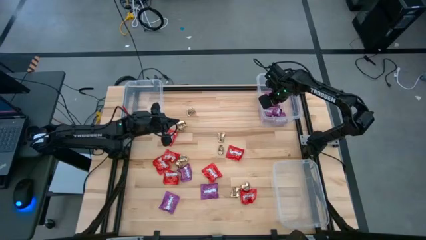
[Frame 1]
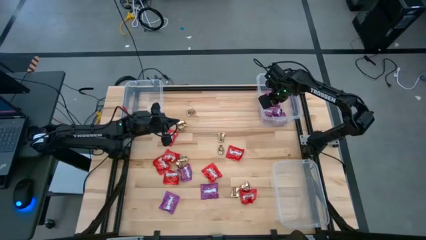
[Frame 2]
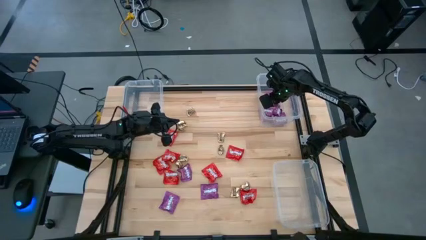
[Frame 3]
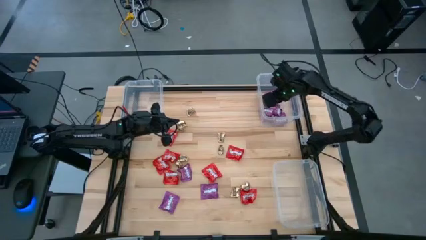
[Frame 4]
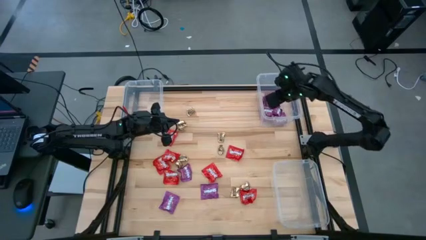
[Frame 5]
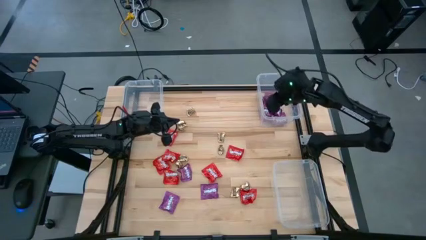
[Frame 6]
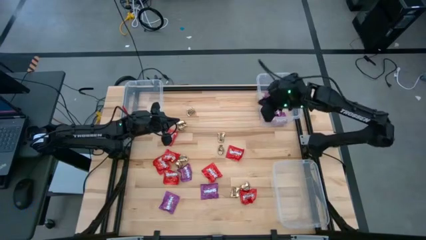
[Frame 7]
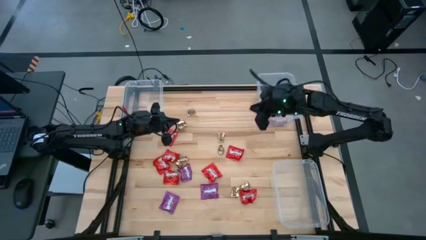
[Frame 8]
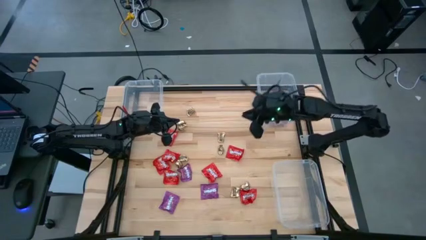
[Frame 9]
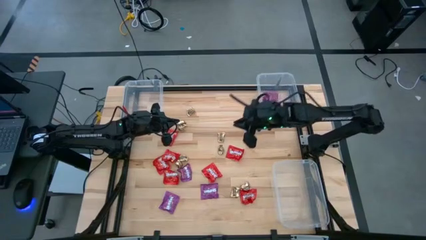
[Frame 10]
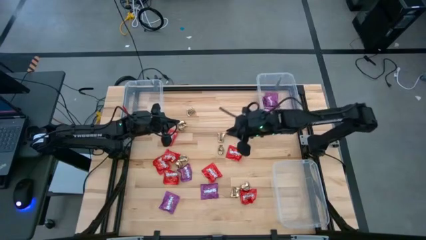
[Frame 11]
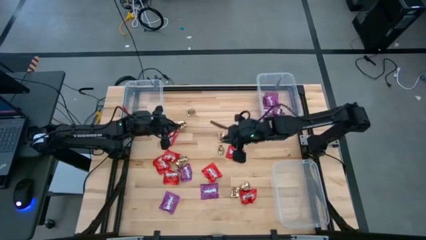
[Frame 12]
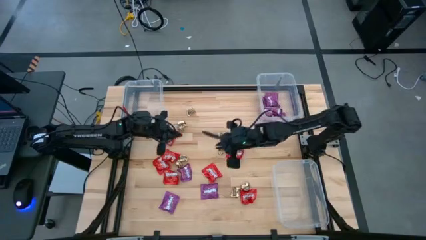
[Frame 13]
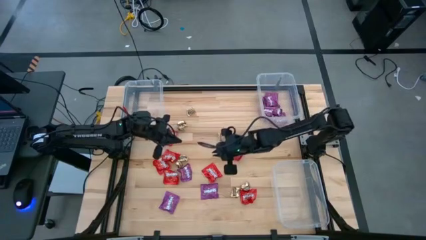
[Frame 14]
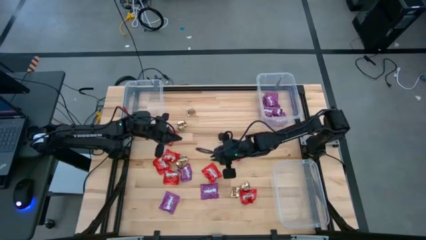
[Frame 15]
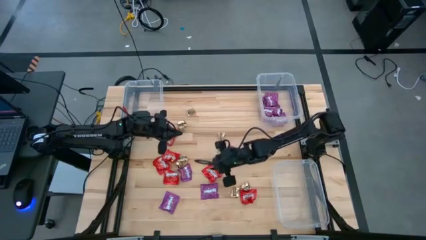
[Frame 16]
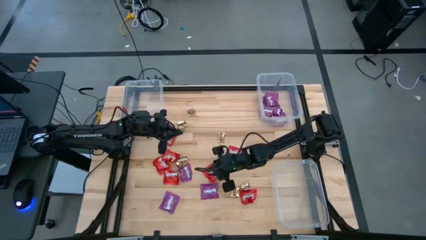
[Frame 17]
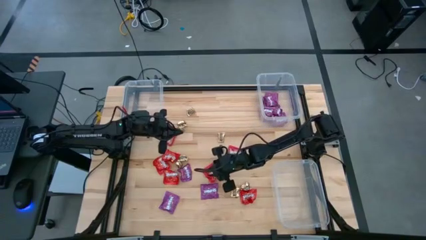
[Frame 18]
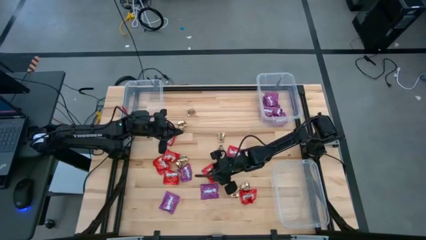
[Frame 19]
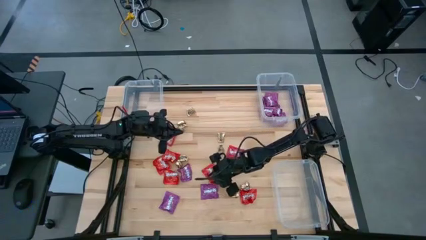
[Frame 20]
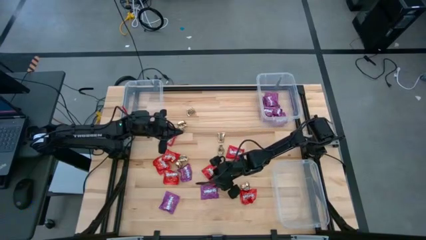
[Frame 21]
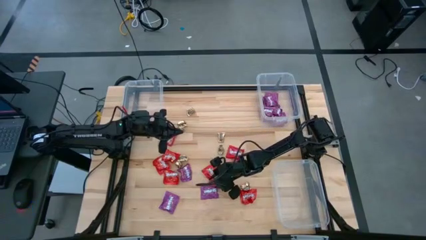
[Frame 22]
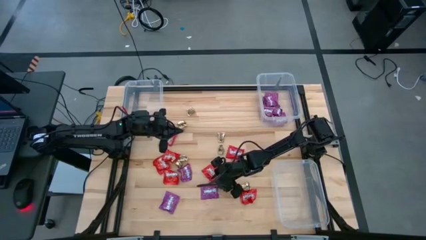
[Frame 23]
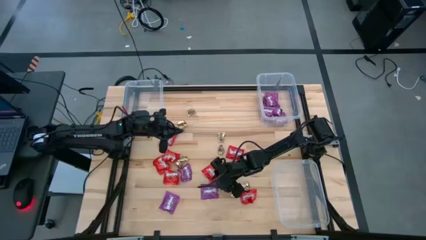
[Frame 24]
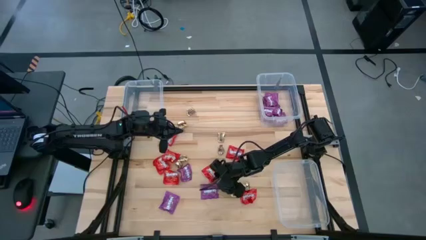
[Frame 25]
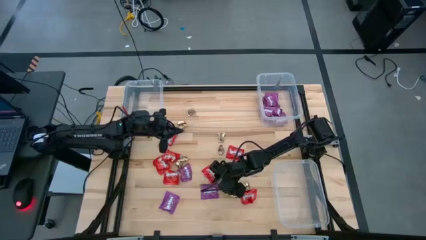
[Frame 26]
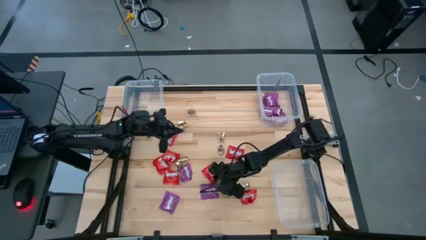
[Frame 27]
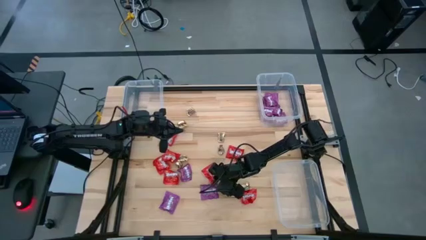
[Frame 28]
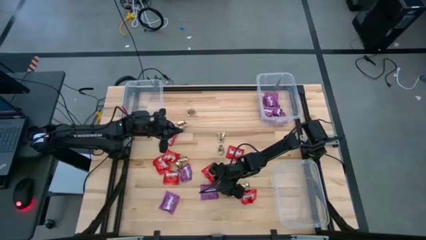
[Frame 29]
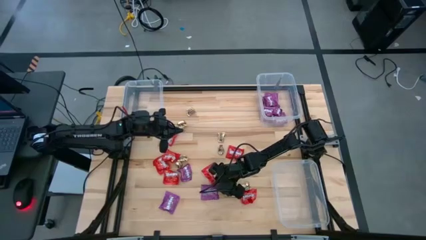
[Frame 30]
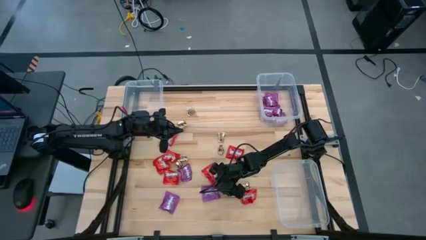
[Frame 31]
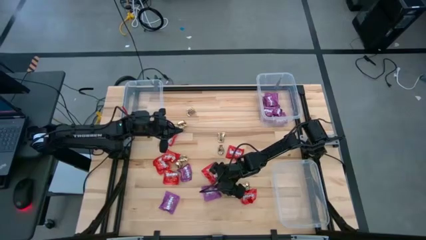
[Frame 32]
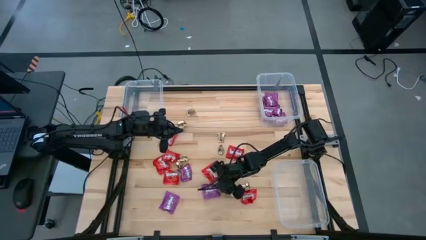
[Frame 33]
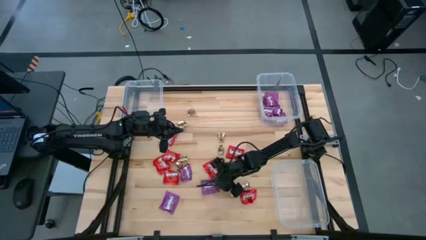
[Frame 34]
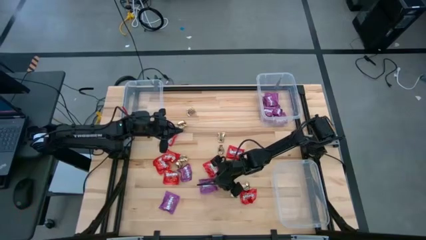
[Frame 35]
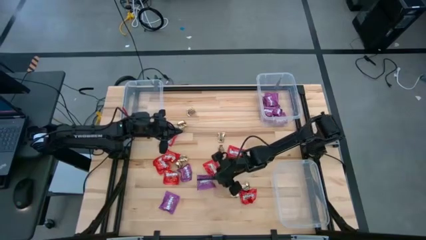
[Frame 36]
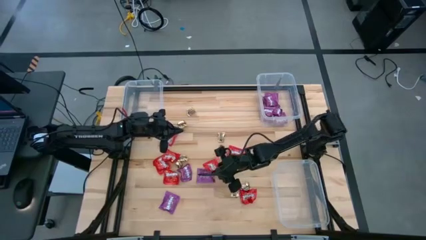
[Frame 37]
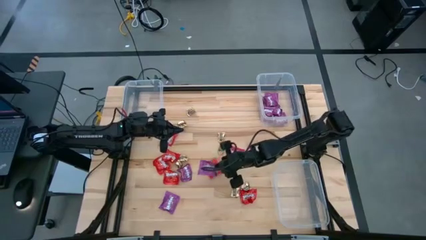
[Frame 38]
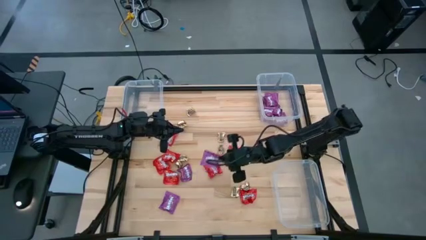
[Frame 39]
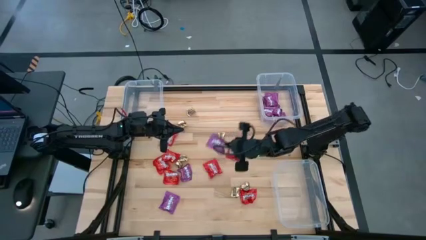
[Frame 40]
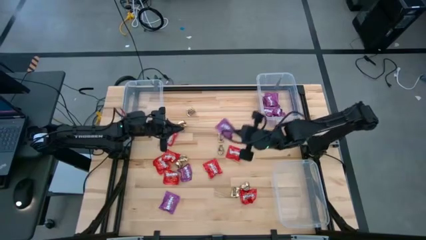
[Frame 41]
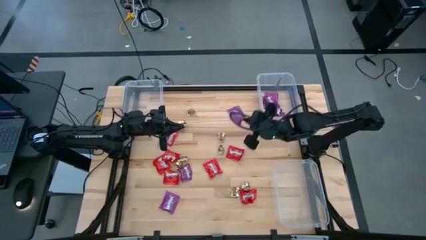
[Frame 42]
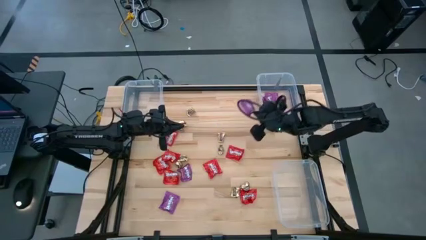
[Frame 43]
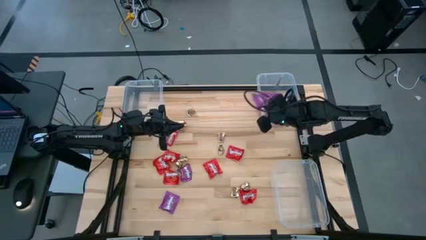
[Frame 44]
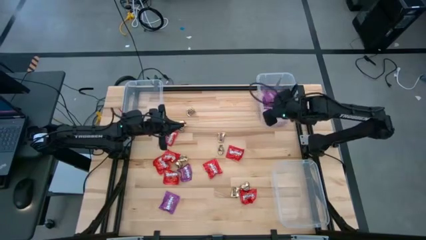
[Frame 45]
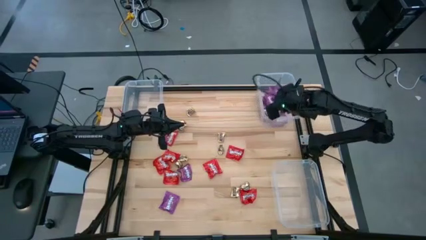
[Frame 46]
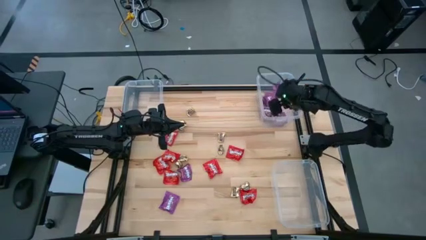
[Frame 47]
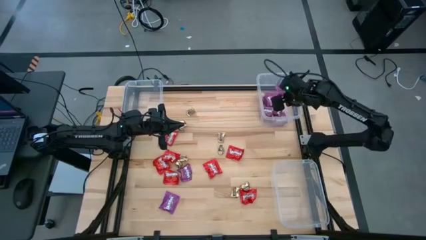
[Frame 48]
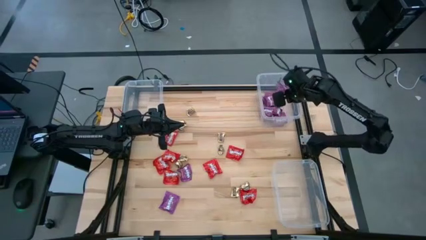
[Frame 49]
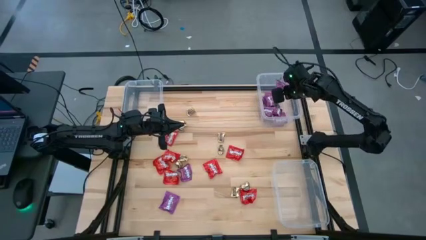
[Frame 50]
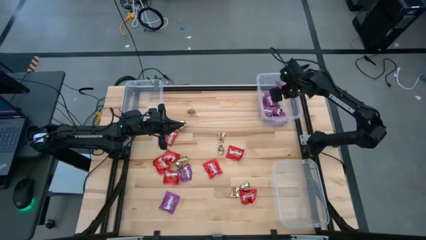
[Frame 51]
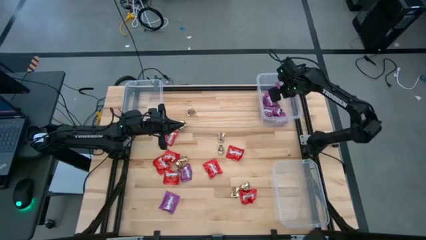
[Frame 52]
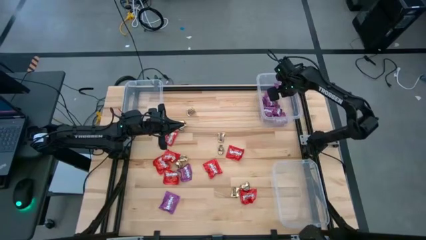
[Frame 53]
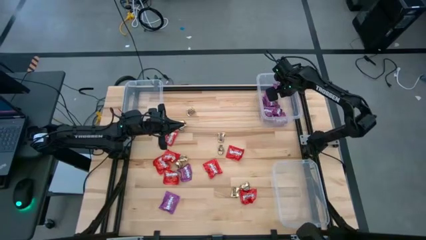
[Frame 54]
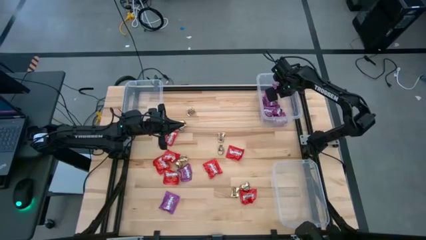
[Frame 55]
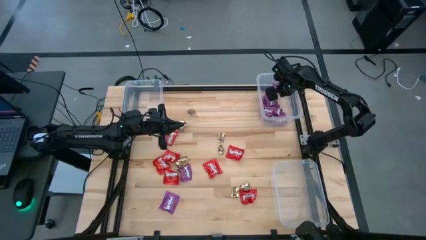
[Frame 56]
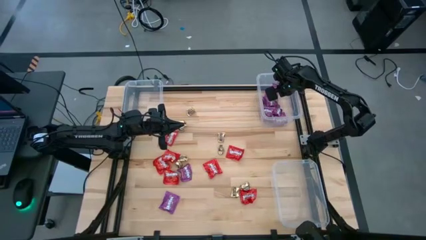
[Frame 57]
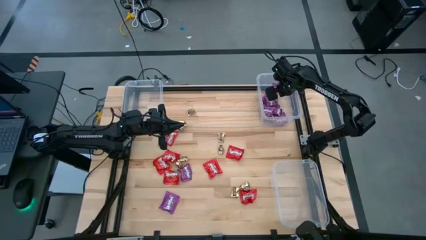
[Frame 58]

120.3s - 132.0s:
Task: Sort candy
Put the purple candy into the top right transparent bin

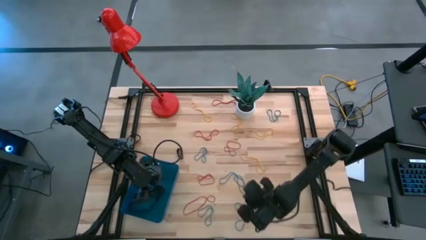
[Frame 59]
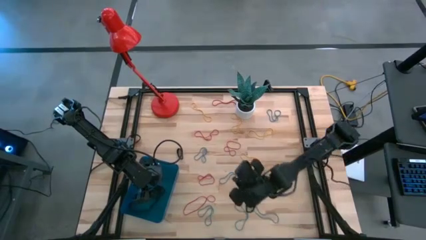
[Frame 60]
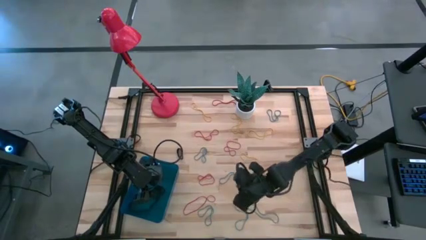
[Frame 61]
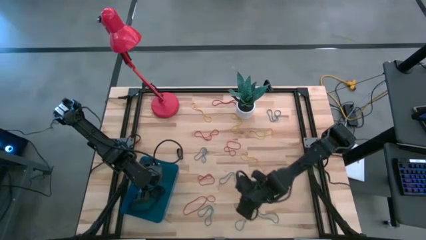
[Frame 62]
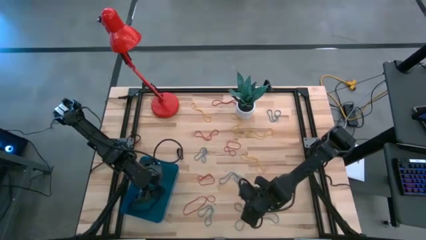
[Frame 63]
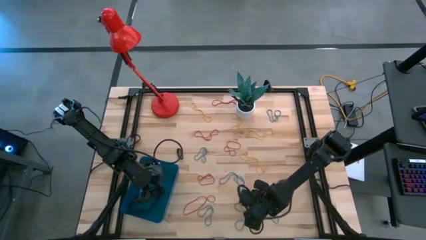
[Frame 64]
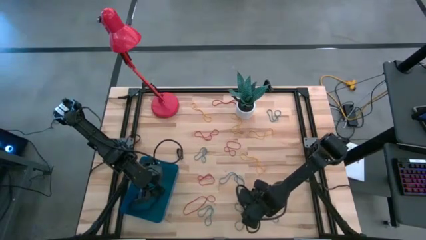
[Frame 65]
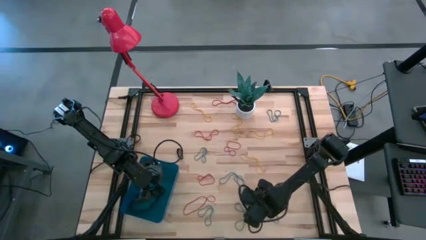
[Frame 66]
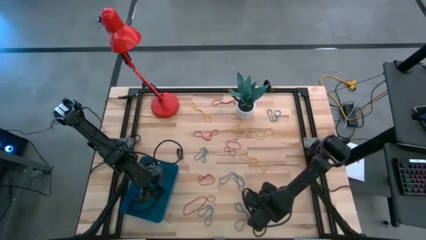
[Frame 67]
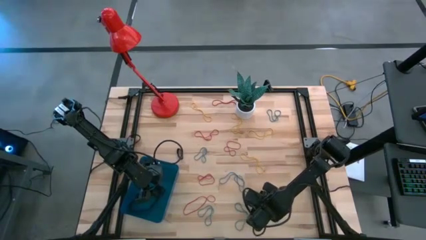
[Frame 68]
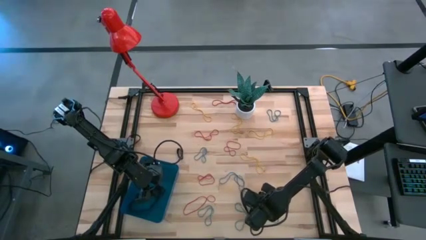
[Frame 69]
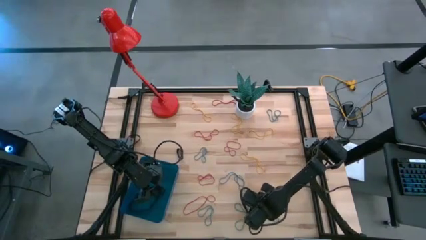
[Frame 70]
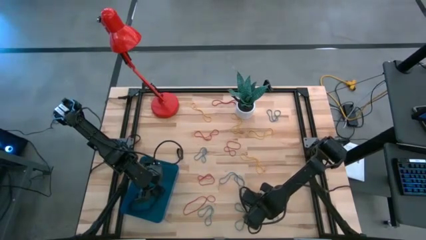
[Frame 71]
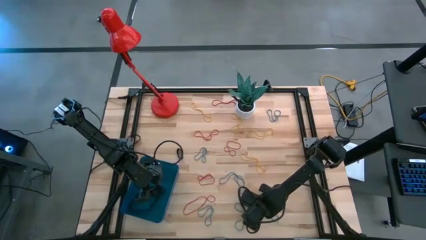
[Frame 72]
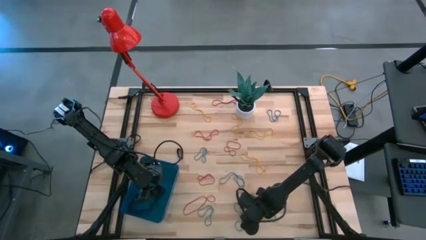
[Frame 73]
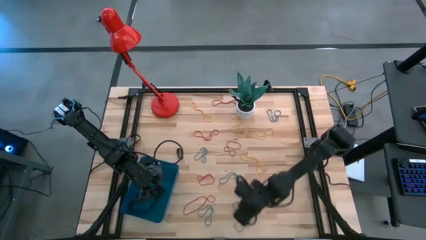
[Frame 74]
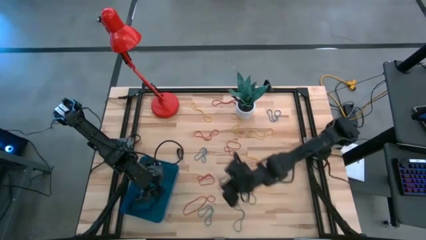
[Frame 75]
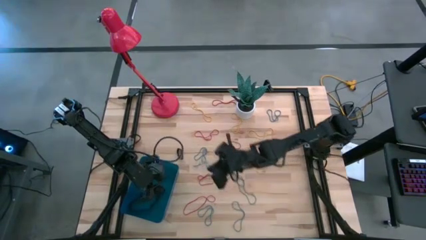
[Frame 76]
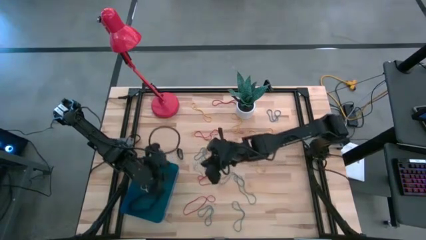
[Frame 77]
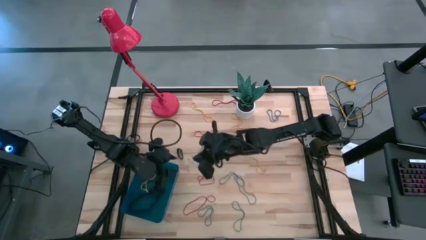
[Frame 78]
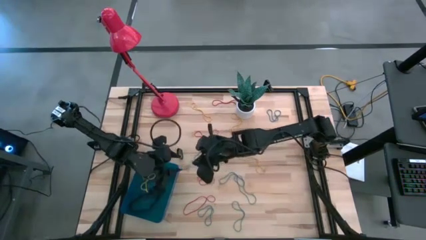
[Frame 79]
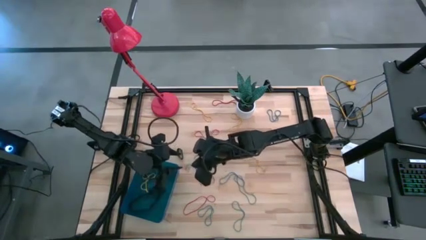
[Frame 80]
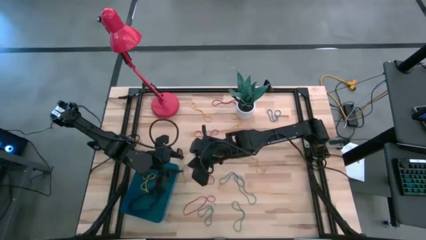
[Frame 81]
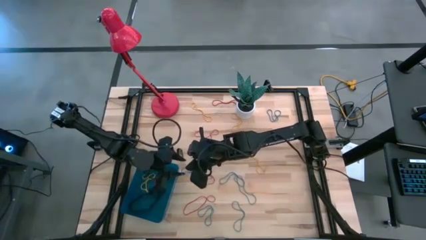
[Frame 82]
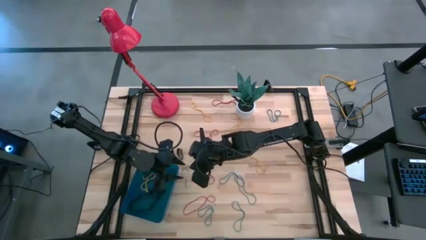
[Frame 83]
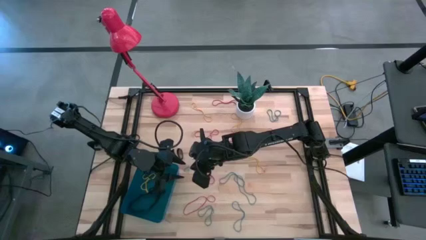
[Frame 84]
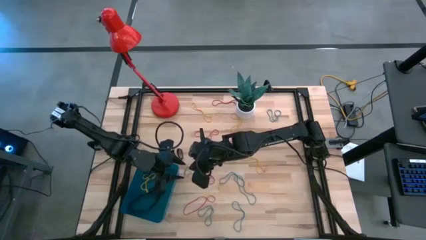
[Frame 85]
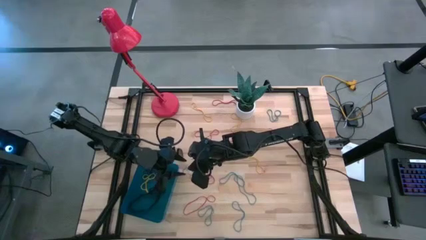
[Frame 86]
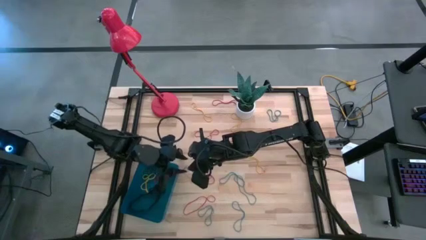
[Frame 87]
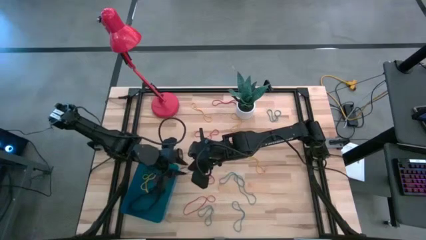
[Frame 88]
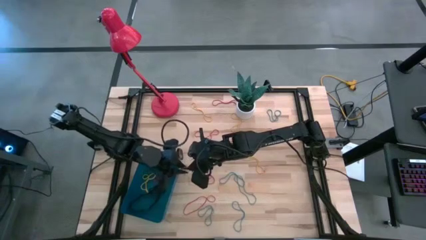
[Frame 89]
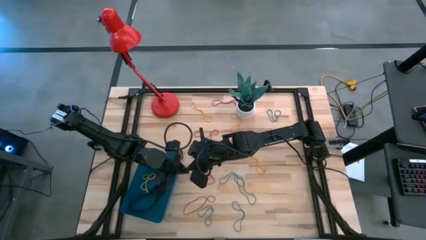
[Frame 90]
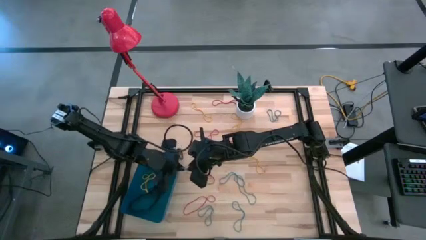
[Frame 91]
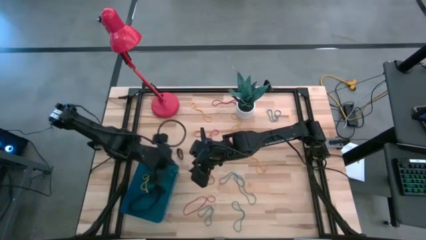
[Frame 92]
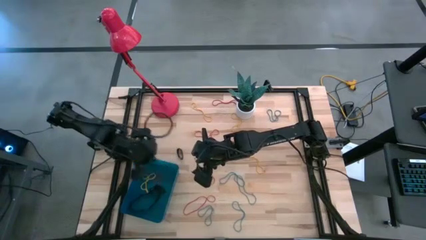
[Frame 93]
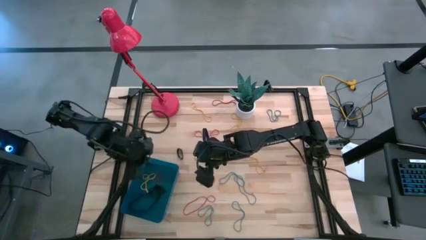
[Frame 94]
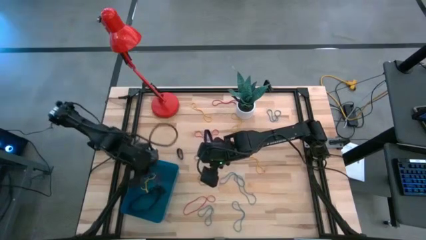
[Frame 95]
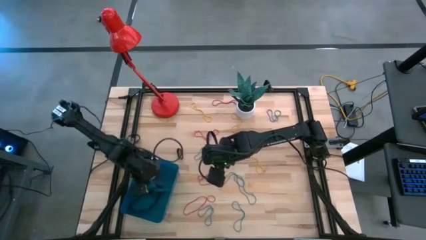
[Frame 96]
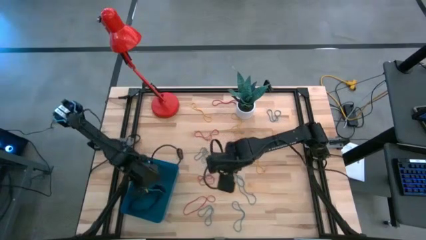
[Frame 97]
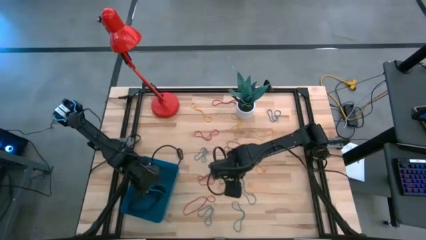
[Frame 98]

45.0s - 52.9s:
Task: Pick and place rubber bands into bin
Put the blue rubber band into the blue bin
